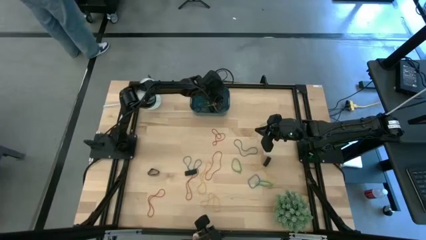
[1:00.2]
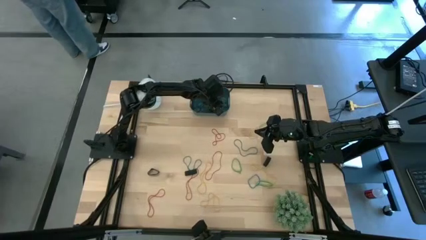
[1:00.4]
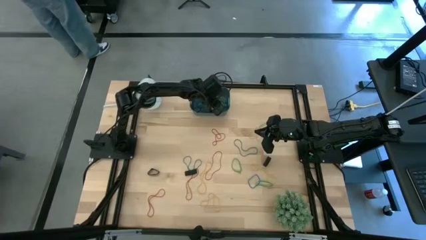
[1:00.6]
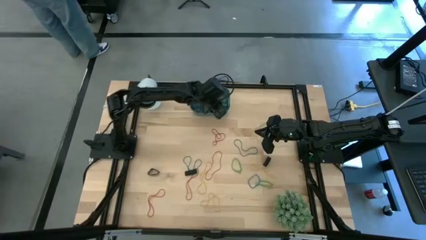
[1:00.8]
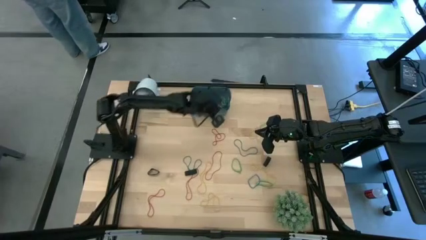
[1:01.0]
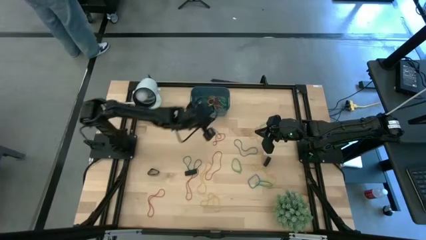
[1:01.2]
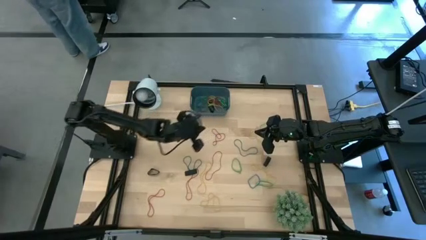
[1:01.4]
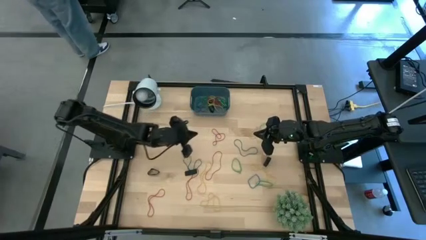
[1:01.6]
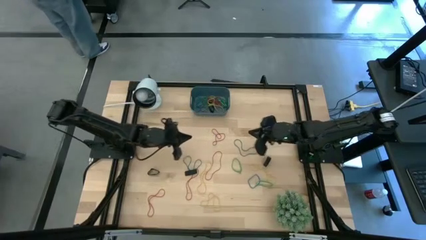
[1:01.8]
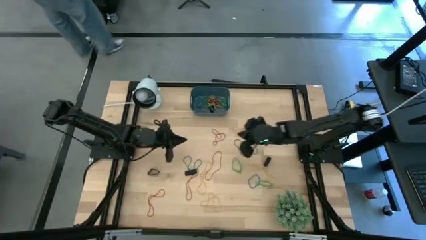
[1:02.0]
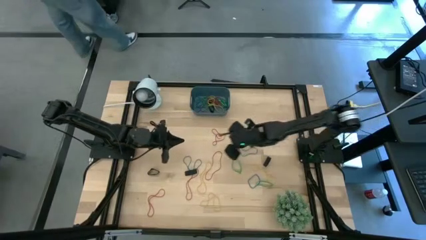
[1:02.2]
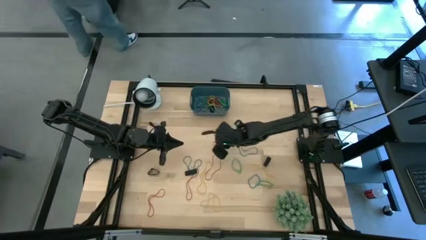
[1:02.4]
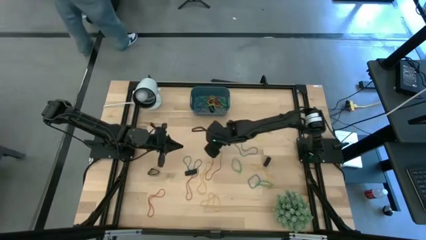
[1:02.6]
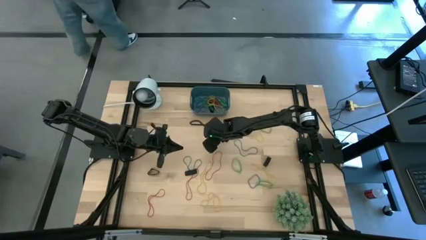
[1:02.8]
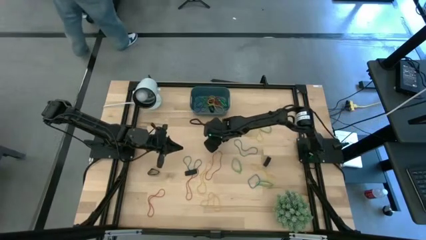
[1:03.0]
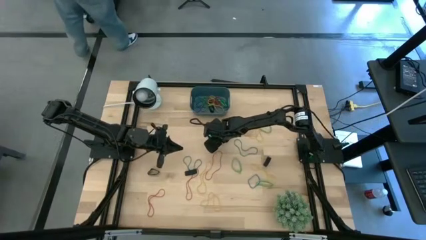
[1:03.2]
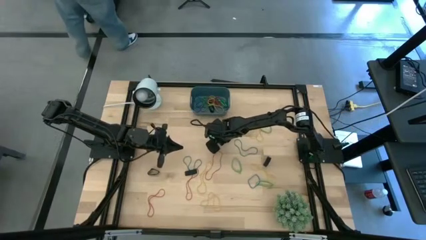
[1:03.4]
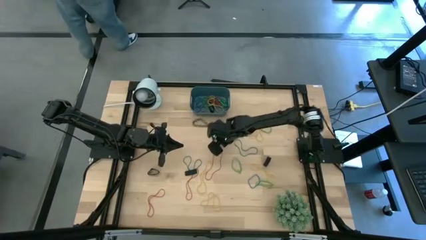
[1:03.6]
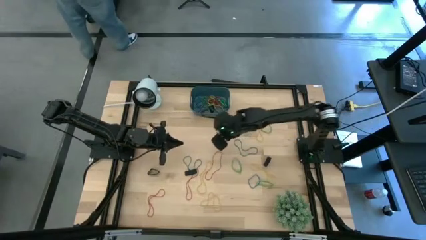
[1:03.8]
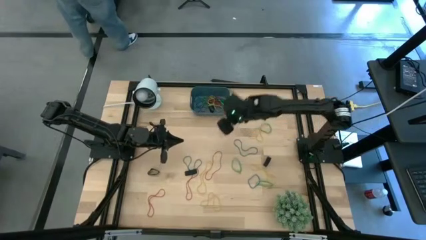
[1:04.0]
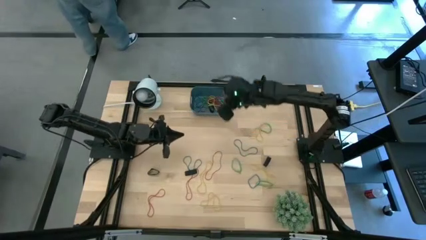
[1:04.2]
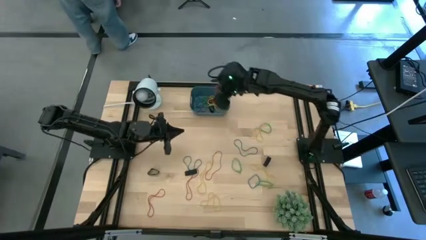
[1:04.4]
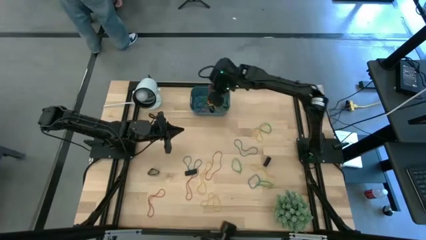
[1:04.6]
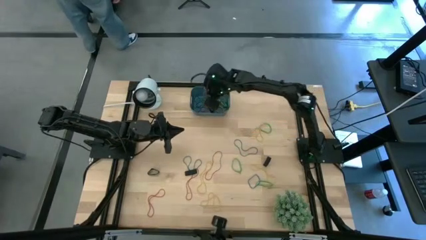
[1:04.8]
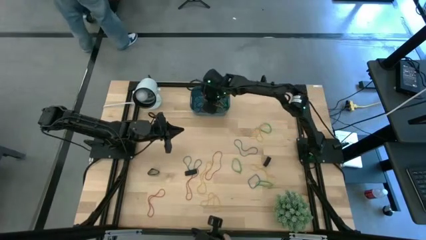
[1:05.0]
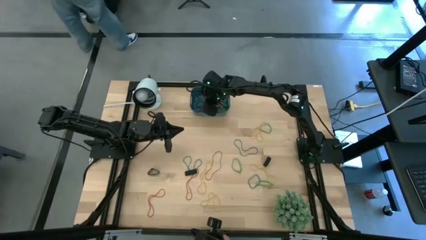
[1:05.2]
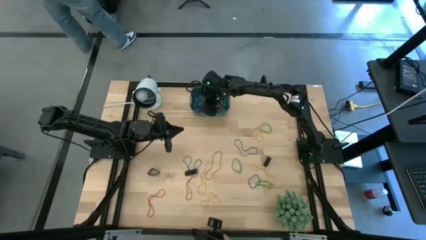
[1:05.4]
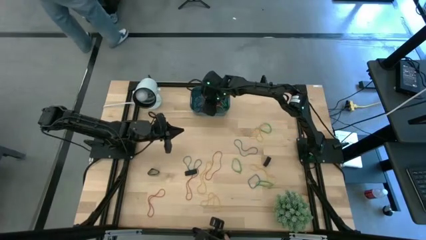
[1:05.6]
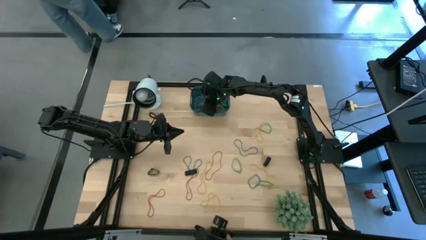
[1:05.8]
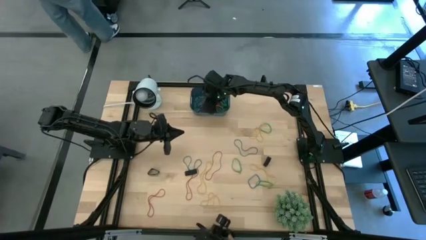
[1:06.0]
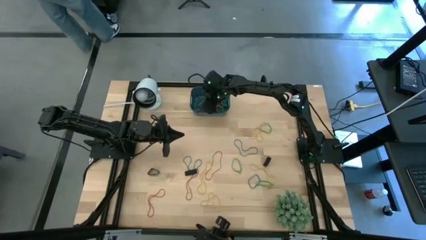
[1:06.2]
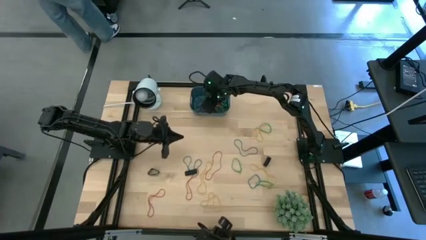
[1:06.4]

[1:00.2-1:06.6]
Task: Pick and place rubber bands into bin
Put the red rubber band into the blue bin

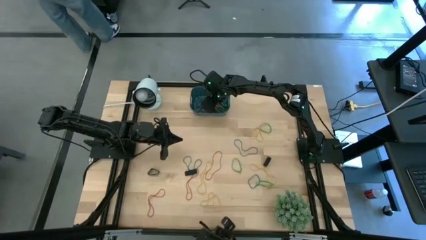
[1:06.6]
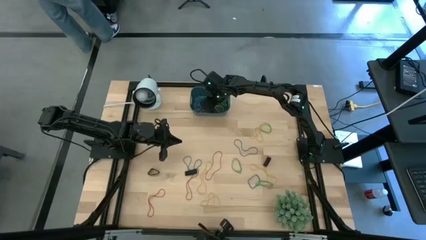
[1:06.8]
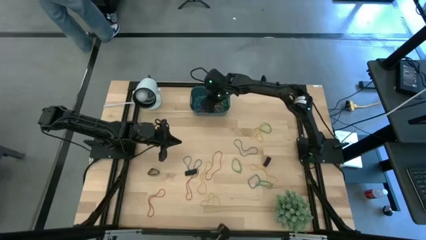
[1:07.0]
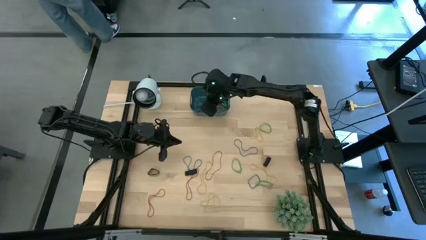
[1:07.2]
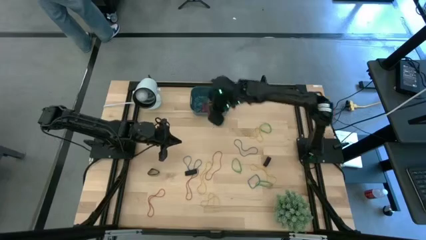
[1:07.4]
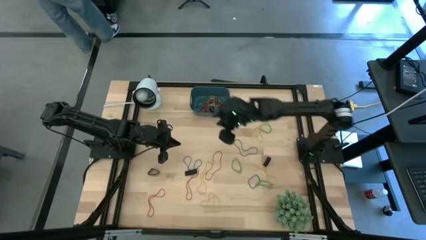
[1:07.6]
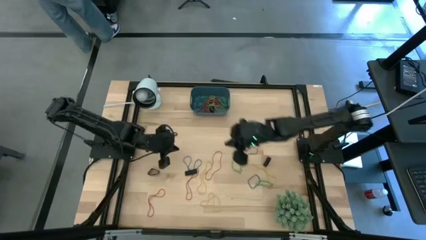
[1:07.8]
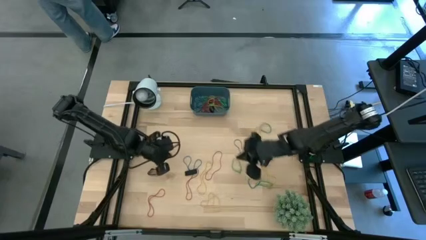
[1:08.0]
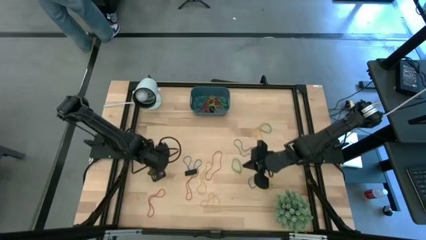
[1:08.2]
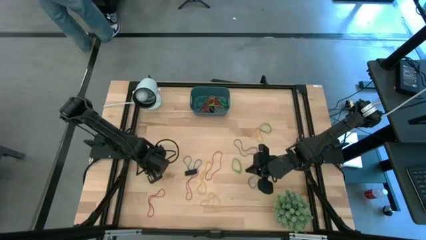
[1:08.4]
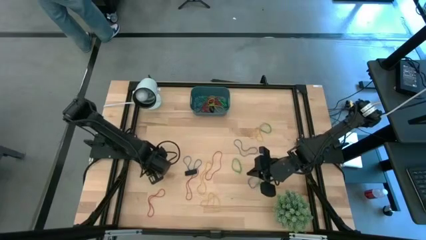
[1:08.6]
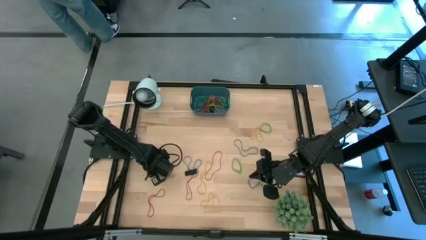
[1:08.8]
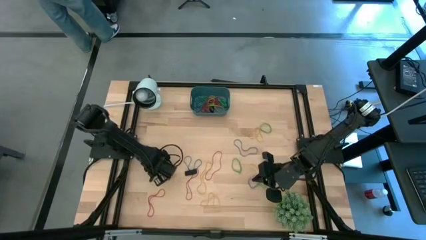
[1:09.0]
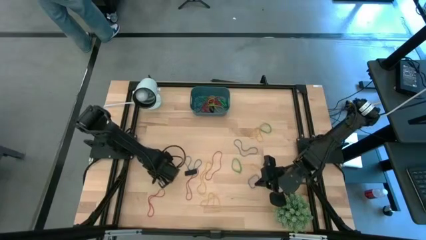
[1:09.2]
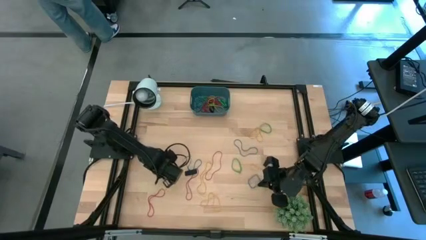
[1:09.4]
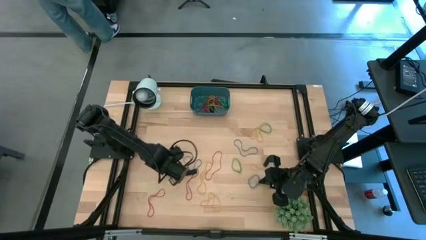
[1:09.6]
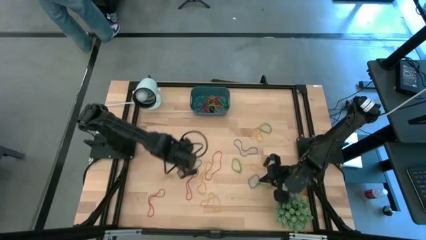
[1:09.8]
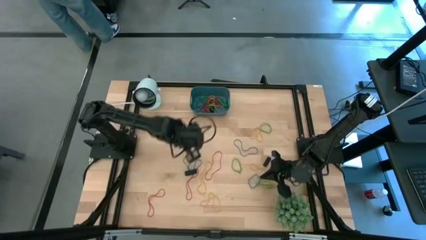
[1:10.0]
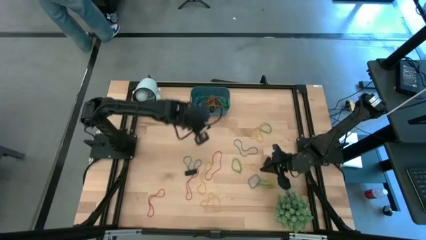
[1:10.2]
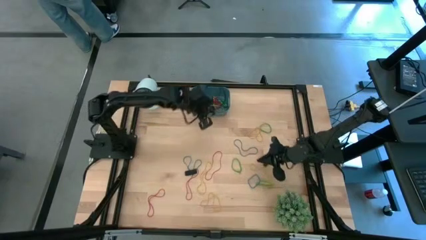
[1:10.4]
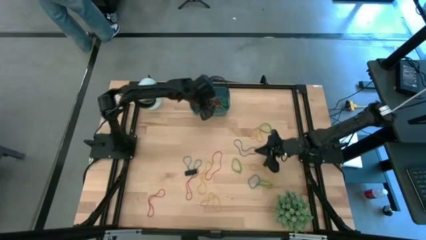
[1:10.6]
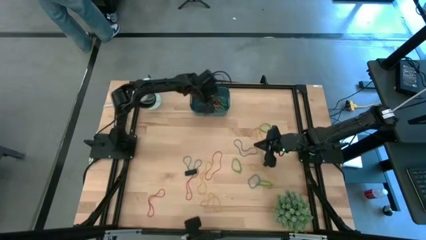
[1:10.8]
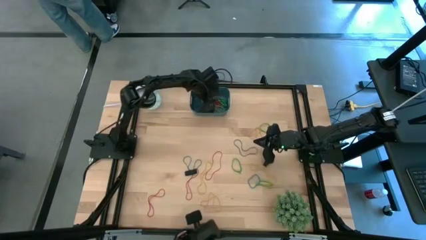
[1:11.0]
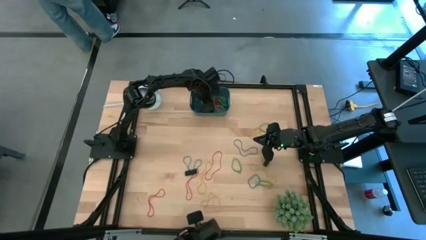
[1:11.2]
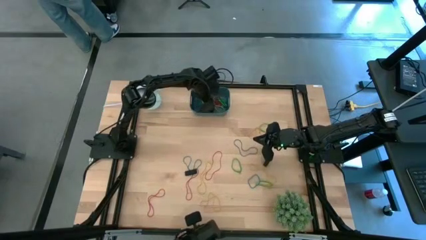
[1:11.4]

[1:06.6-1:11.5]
Put the black rubber band into the blue bin

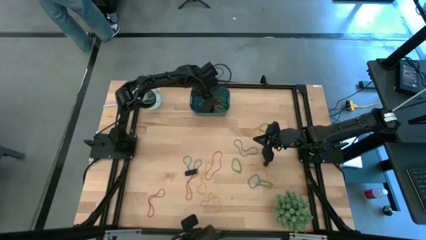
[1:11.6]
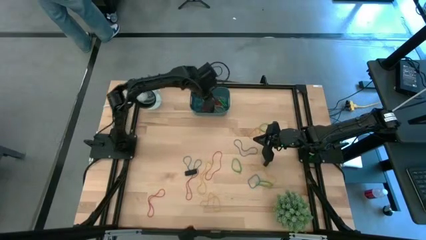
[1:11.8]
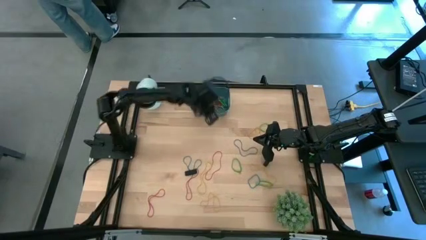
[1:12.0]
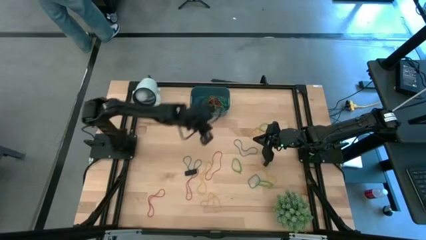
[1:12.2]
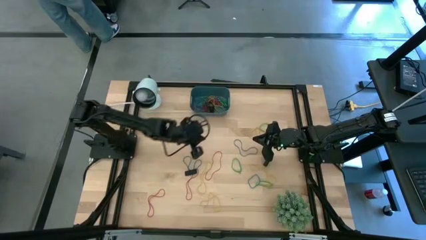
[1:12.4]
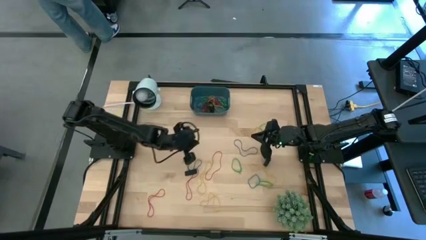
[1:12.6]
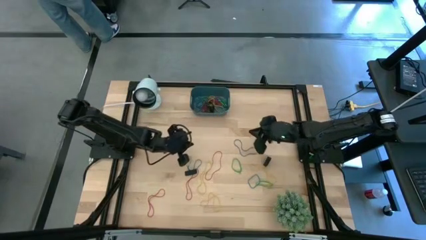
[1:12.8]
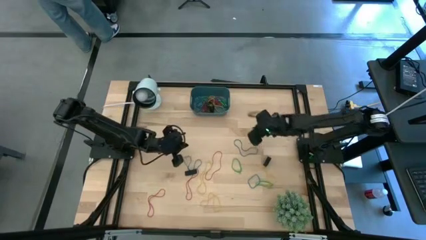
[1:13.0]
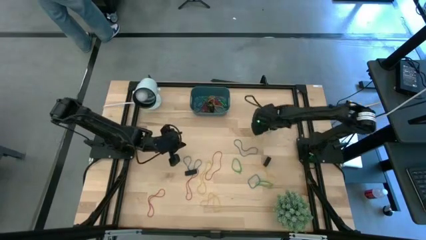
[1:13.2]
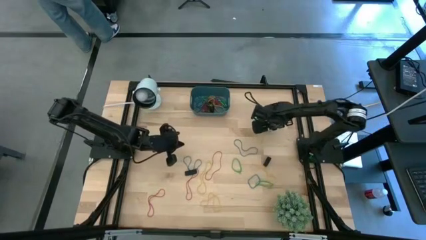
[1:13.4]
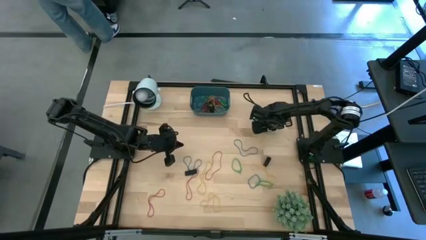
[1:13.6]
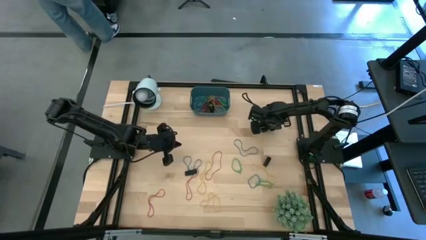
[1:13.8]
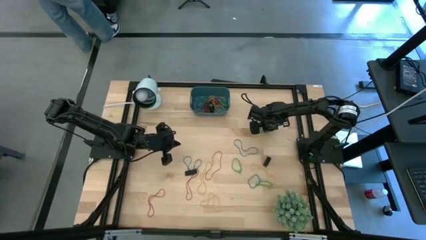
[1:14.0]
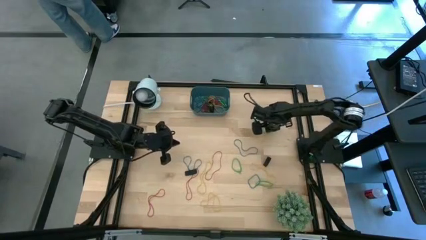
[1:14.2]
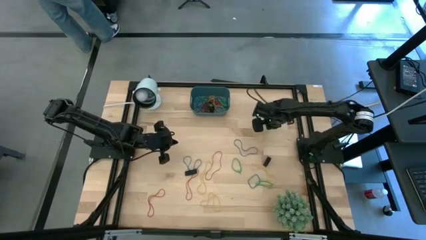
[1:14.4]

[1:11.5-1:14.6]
Put the green rubber band into the blue bin

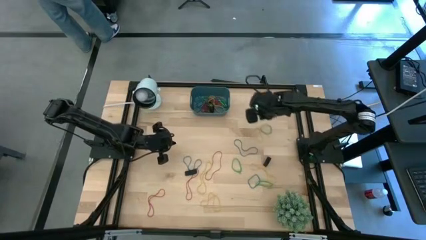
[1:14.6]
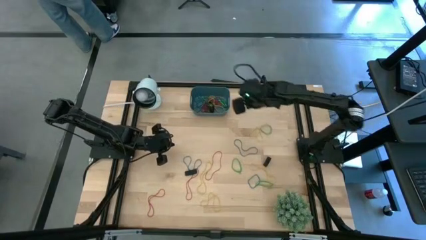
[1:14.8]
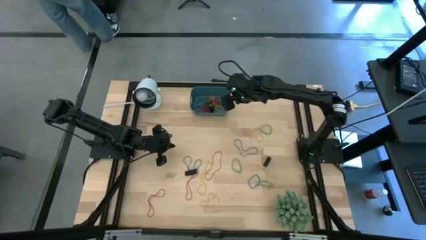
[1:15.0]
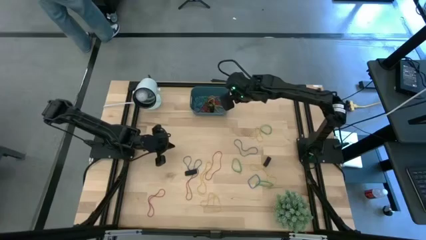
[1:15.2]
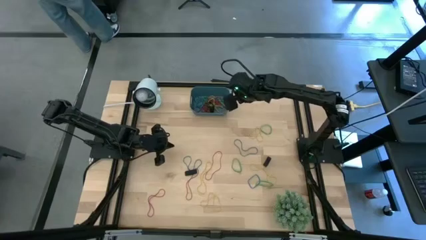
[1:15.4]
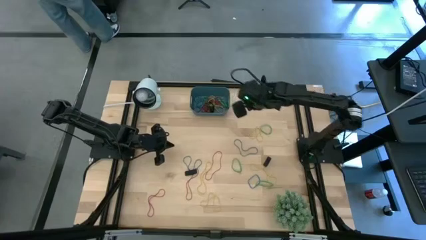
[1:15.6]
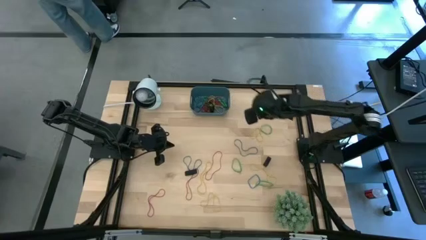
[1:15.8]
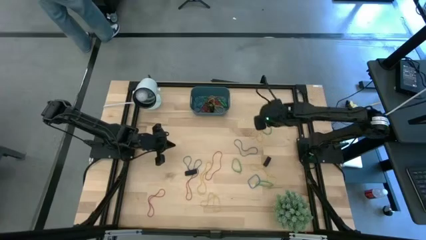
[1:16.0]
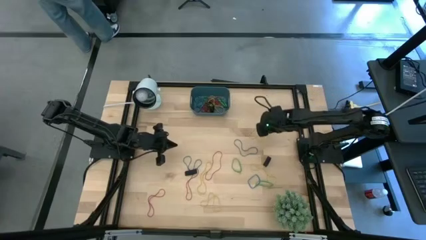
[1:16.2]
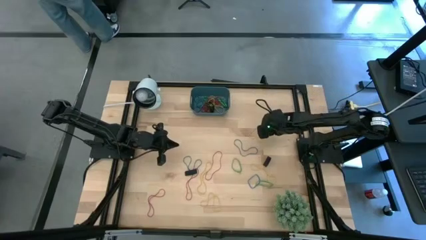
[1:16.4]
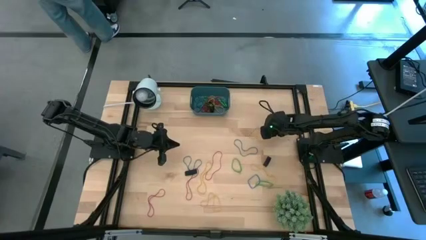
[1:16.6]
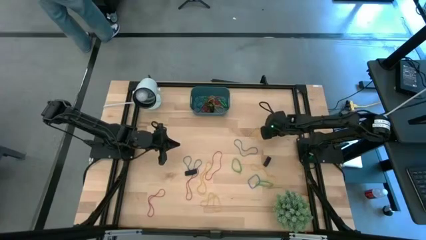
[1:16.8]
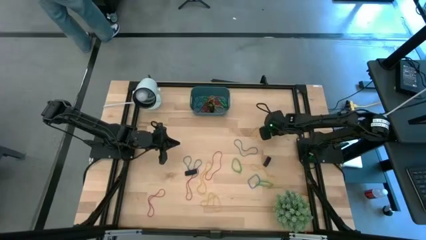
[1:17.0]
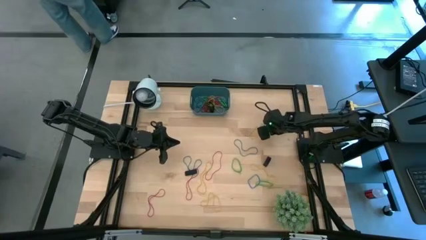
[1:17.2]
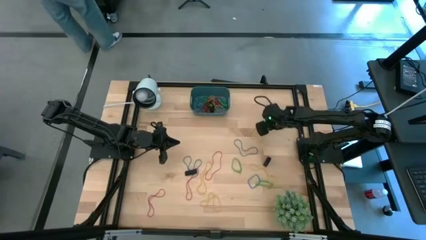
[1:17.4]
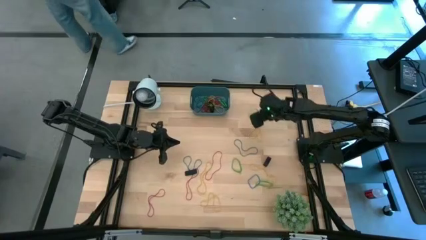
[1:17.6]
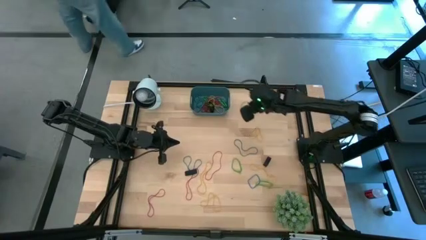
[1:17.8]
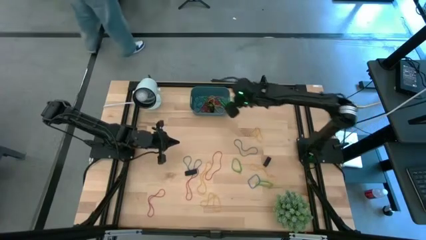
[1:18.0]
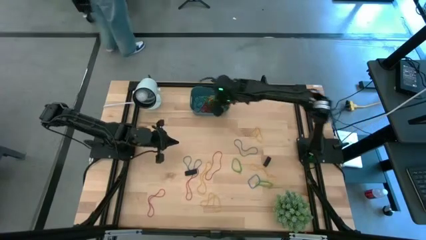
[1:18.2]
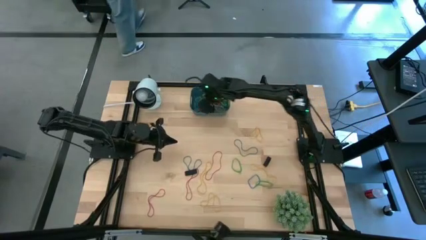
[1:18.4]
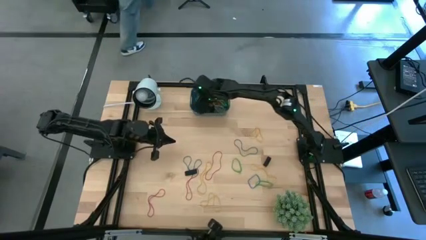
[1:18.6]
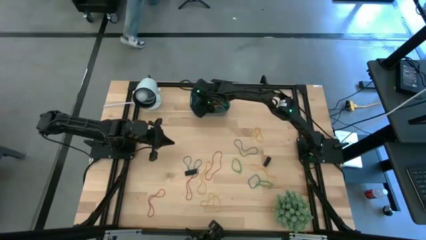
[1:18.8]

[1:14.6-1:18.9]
Put the green rubber band into the blue bin
